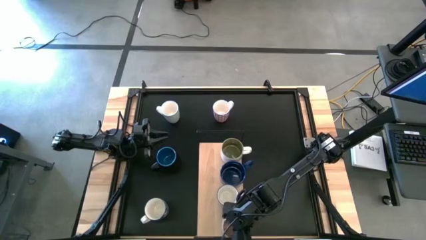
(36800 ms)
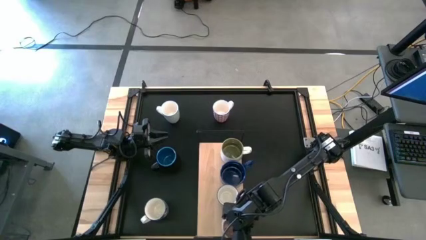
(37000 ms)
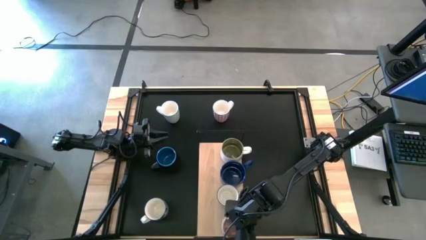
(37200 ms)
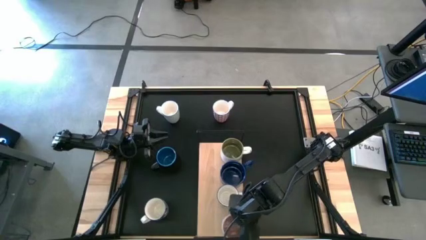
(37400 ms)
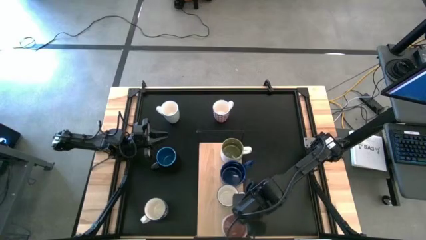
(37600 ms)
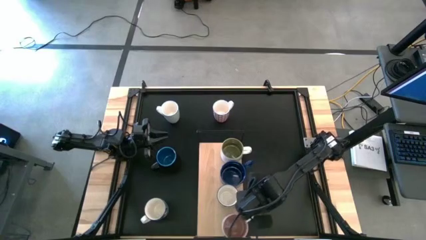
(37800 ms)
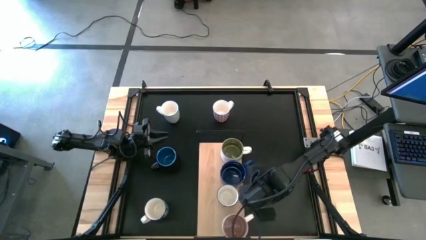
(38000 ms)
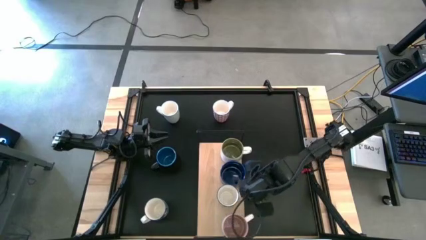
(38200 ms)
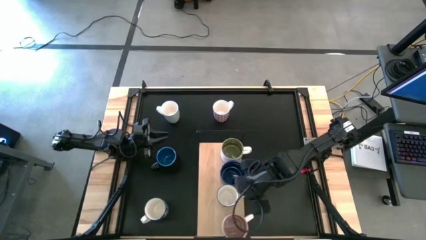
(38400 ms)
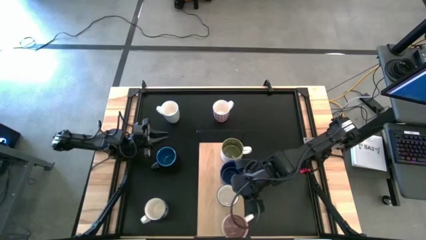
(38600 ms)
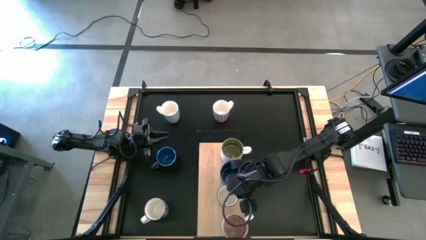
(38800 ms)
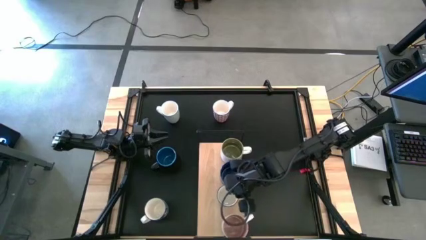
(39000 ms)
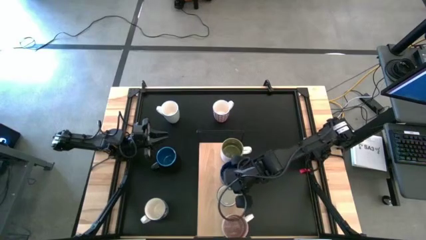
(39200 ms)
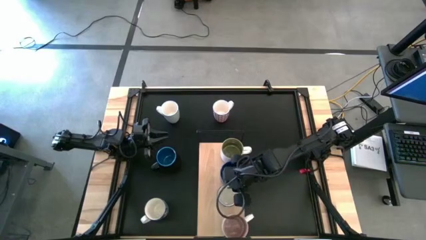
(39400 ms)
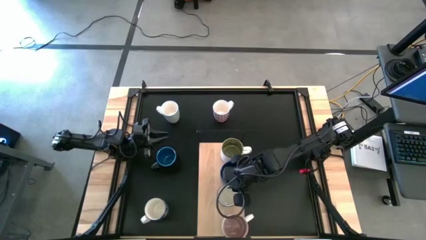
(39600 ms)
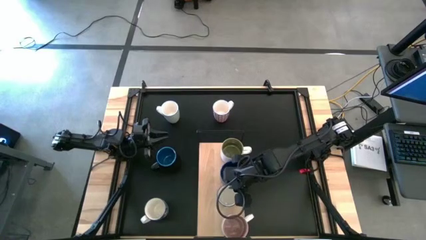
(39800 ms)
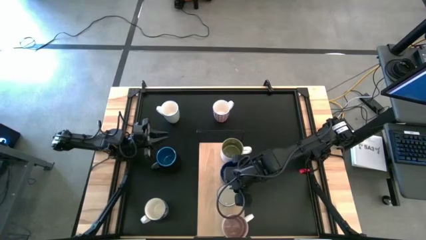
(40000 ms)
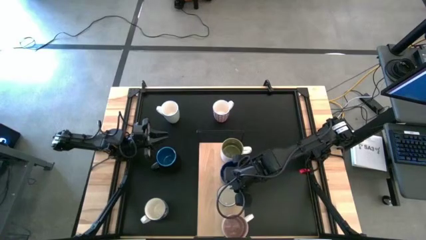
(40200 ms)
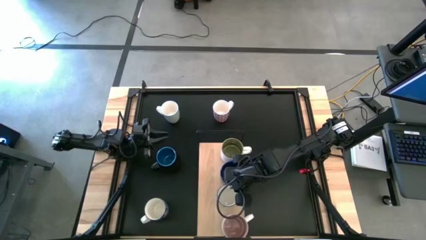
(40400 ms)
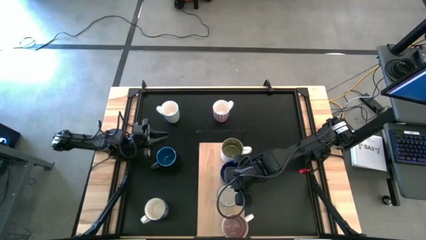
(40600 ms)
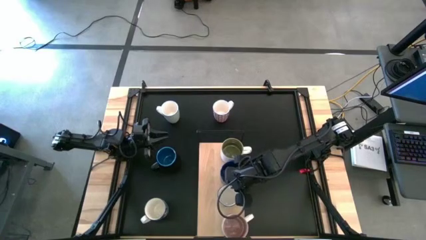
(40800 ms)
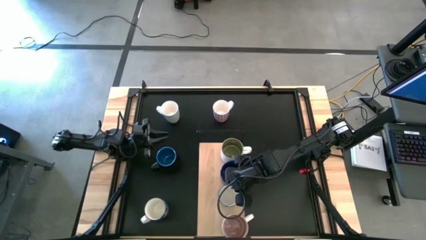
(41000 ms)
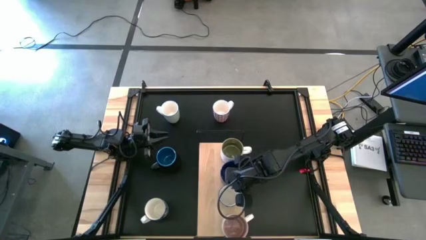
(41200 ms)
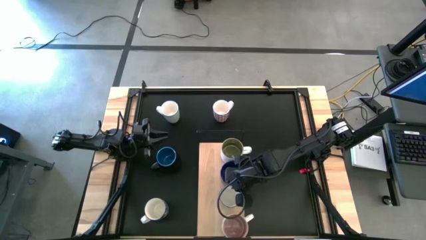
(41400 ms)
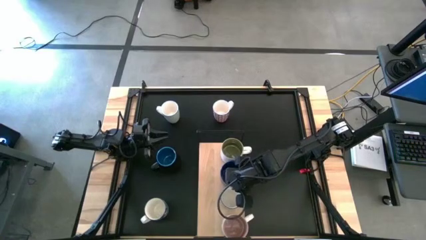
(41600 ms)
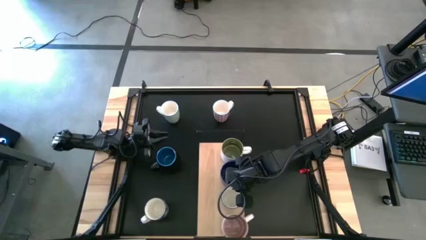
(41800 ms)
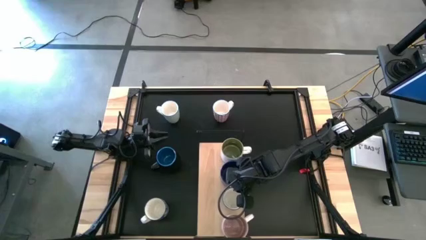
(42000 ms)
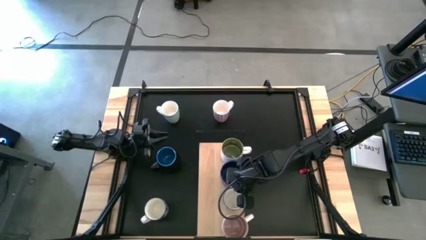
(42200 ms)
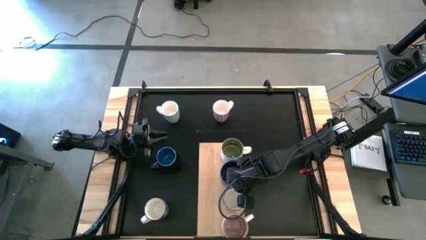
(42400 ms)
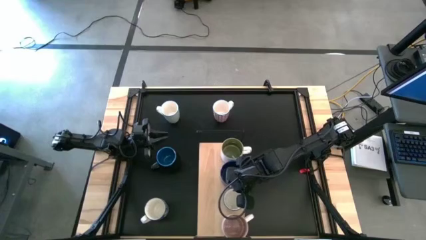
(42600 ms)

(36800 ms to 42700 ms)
Task: Place coffee mugs
Adjust the blue patterned mug on the shelf

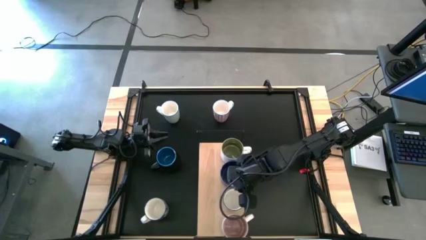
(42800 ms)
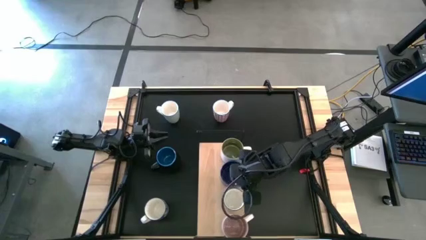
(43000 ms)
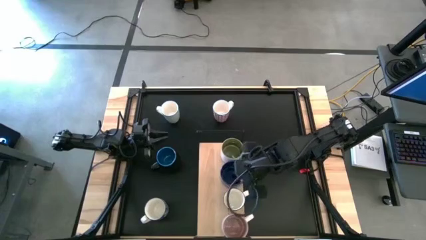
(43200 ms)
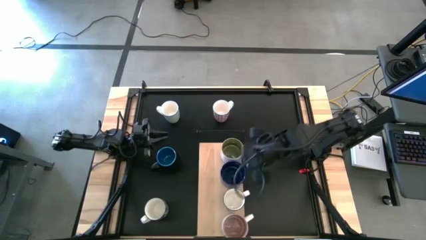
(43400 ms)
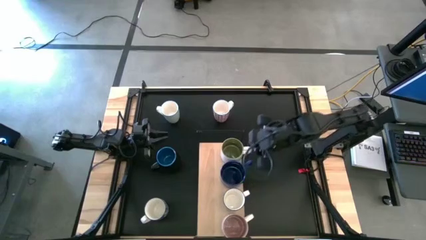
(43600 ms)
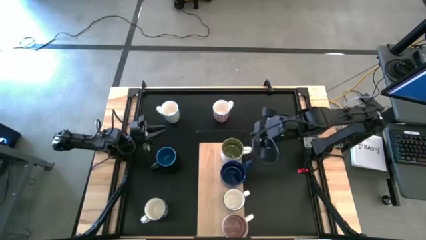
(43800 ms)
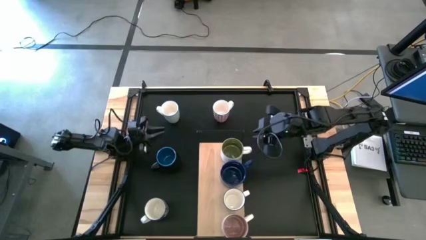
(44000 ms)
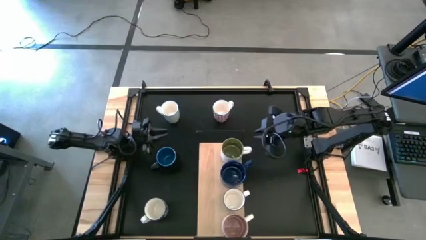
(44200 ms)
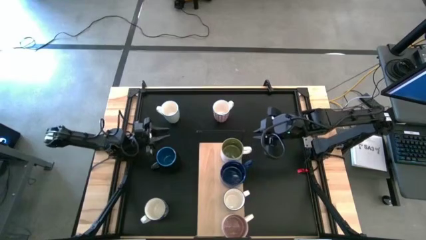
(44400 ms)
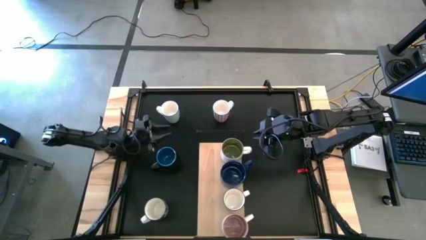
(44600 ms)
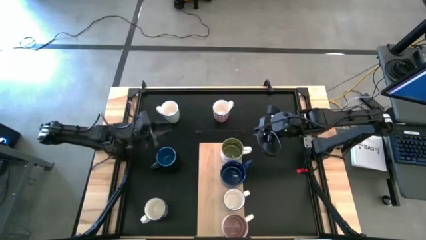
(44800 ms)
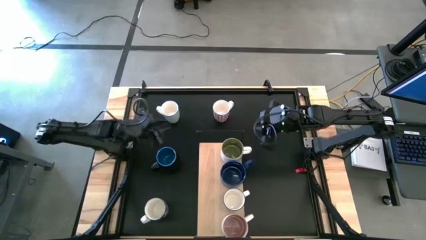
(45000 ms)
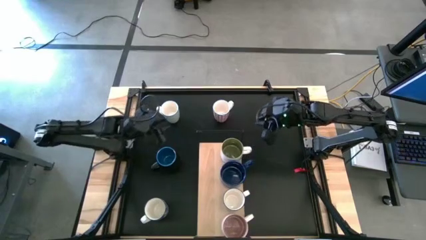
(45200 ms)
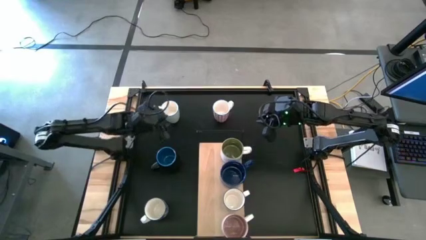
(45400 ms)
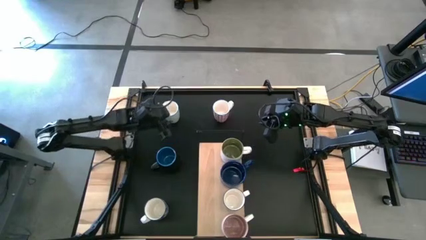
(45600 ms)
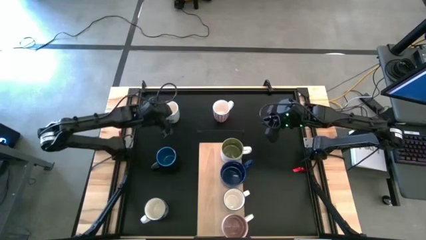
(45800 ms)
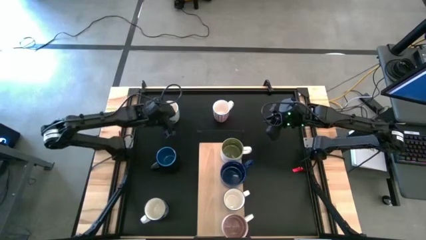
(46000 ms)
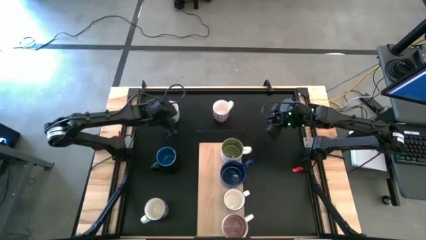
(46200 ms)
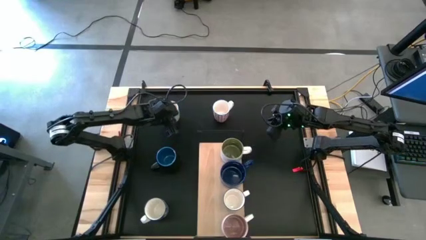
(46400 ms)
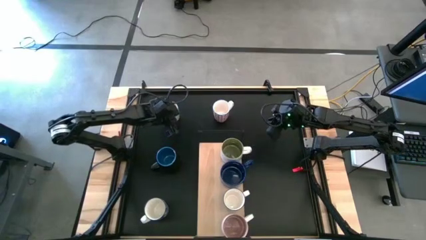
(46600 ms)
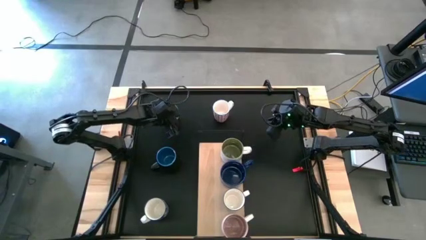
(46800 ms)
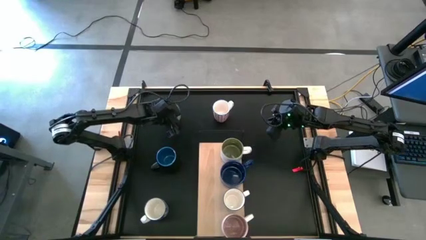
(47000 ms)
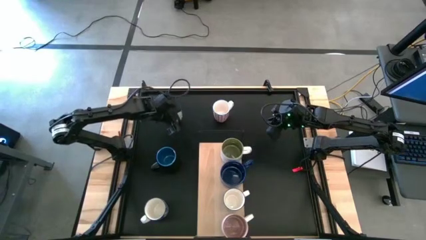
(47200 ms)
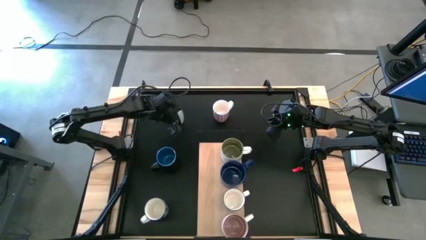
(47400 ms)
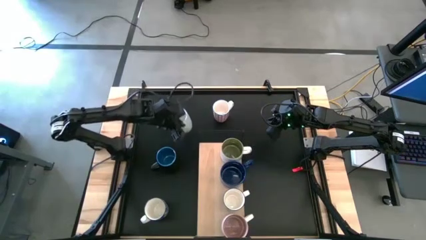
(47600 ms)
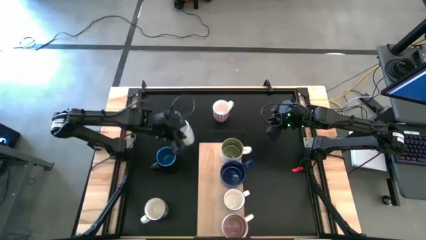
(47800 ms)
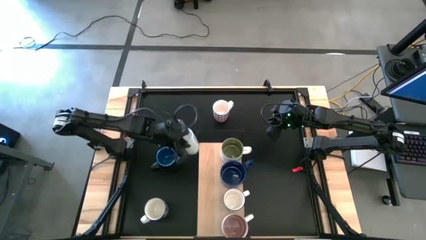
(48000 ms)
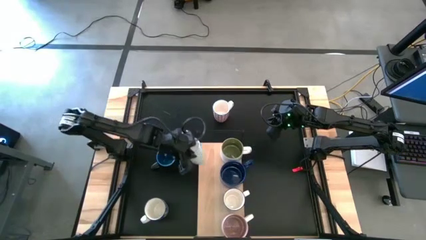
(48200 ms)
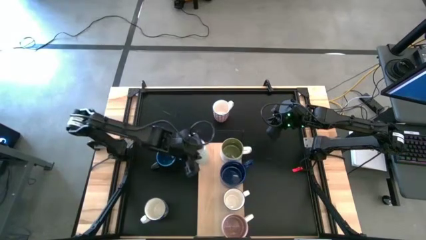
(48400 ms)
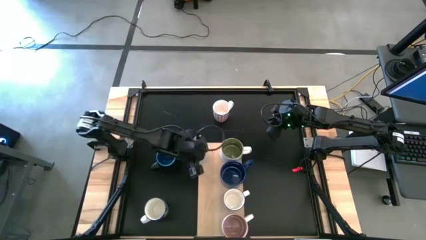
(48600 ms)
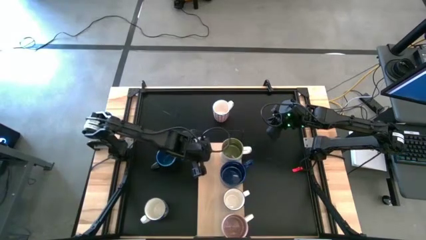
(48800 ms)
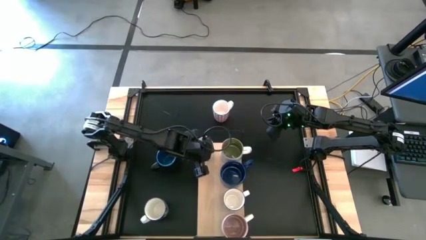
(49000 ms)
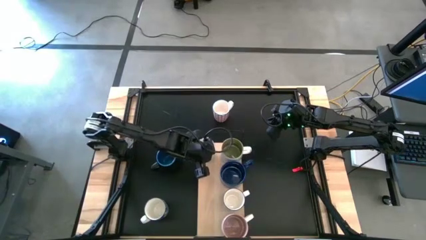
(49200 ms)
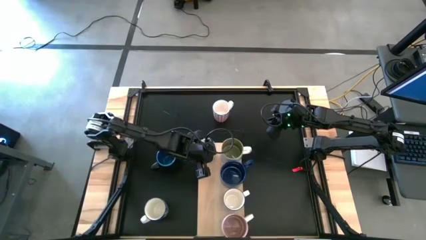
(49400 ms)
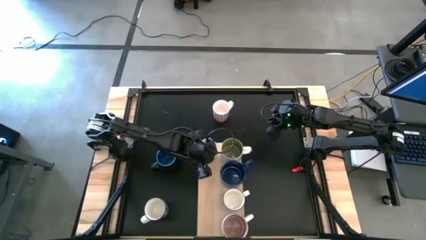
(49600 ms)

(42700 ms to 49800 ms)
Put the light blue patterned mug on the shelf

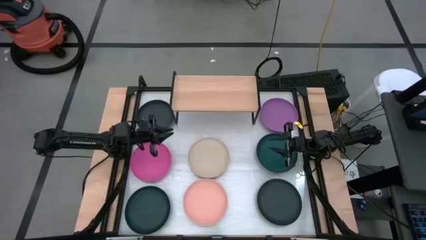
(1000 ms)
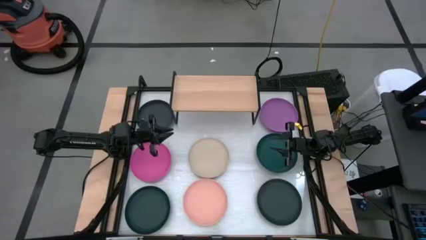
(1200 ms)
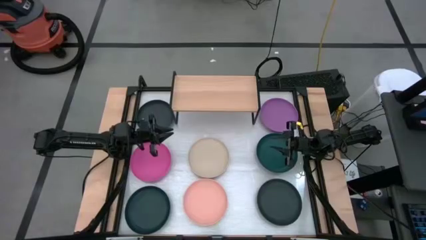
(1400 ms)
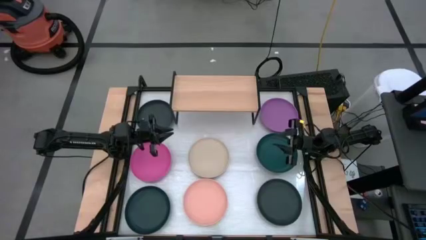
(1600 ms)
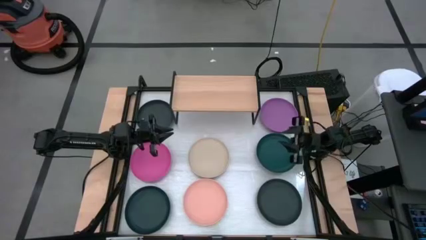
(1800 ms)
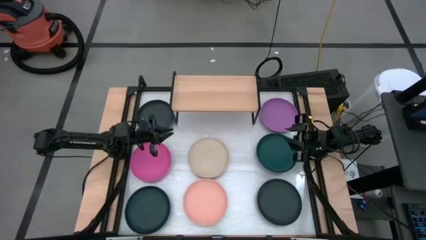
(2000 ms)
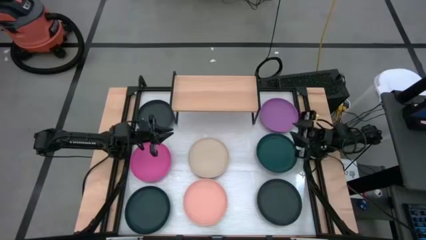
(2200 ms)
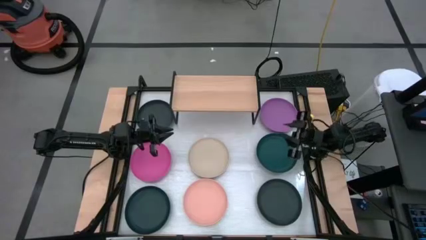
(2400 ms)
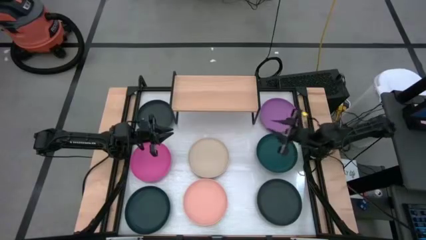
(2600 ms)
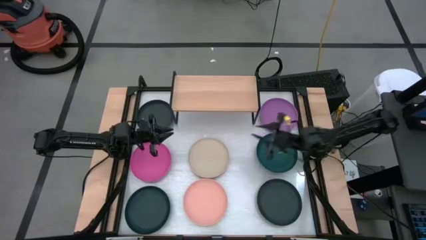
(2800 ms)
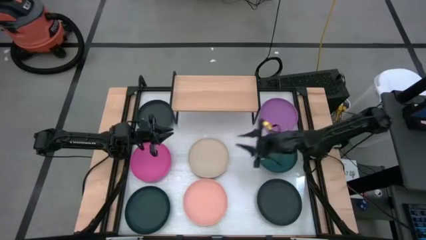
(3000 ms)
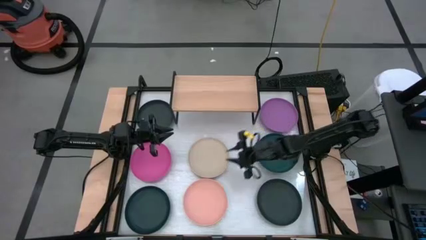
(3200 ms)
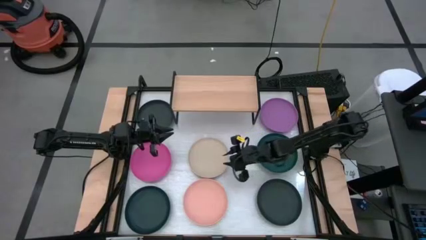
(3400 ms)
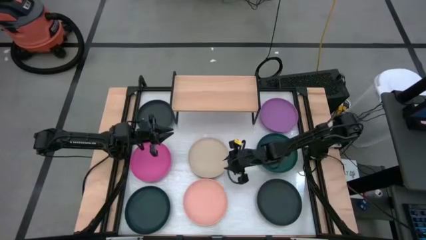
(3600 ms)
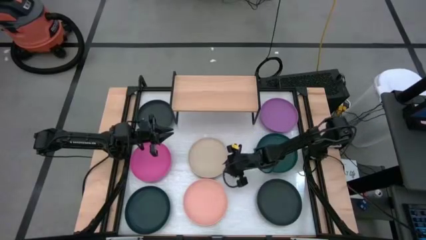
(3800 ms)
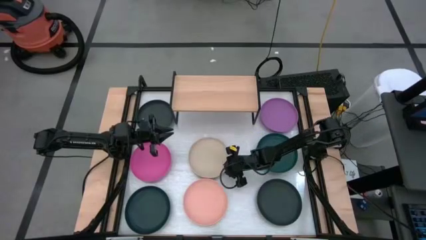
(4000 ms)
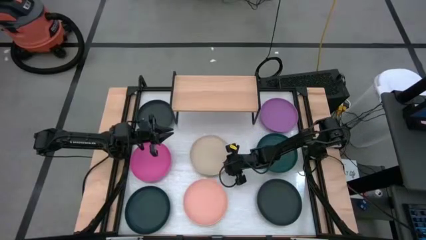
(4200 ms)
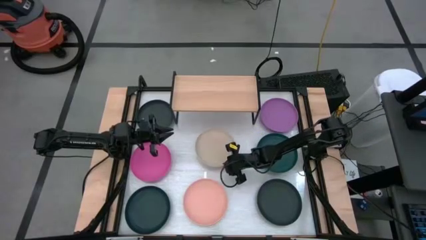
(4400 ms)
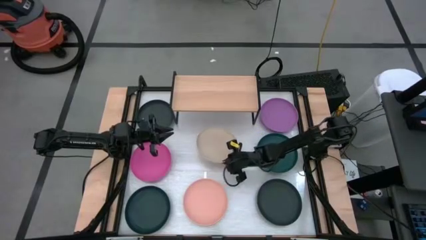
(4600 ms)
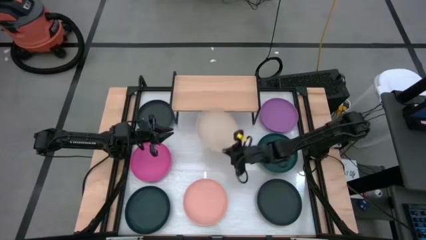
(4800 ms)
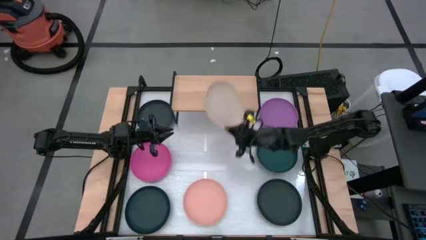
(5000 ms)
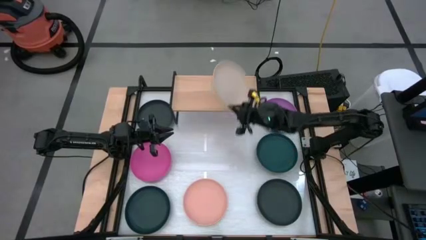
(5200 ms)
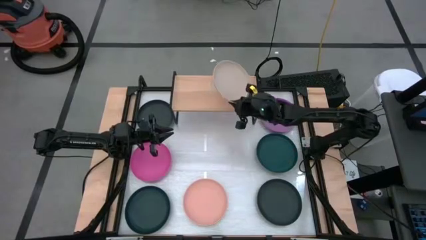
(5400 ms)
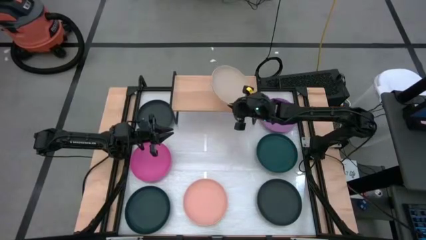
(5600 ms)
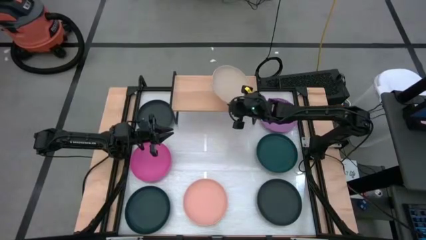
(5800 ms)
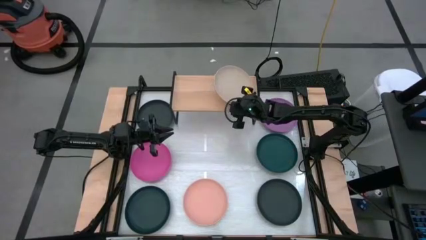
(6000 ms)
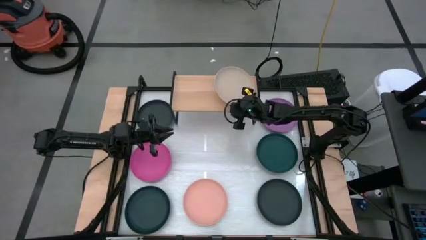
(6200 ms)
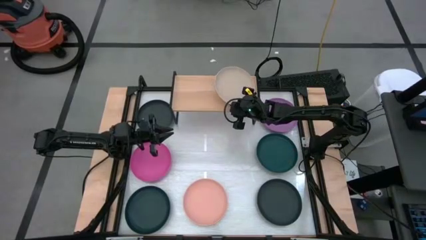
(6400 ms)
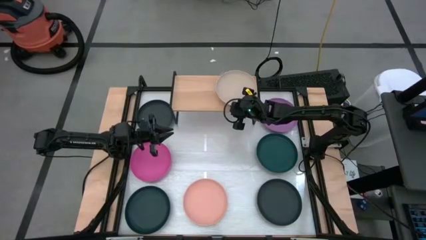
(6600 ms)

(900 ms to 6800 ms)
Task: Place and stack plates onto a shelf
Put the brown plate on the shelf
